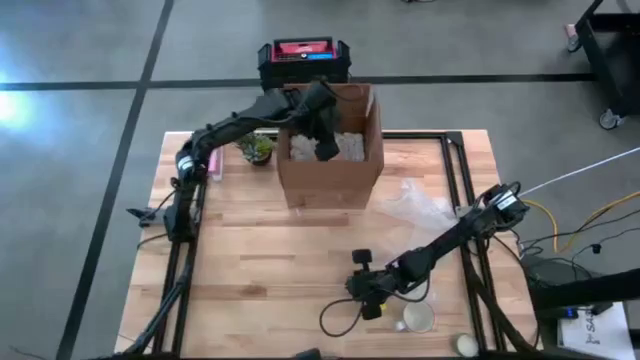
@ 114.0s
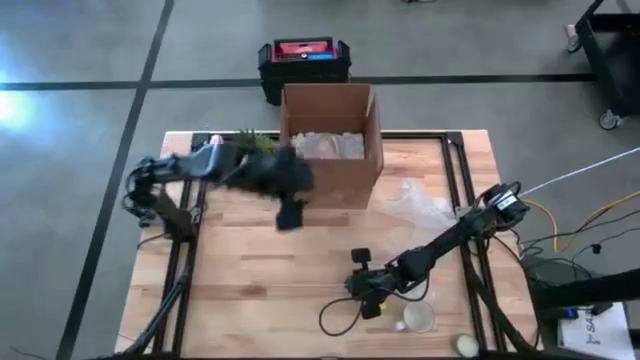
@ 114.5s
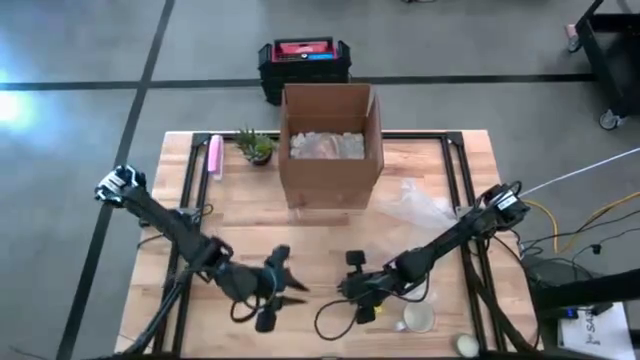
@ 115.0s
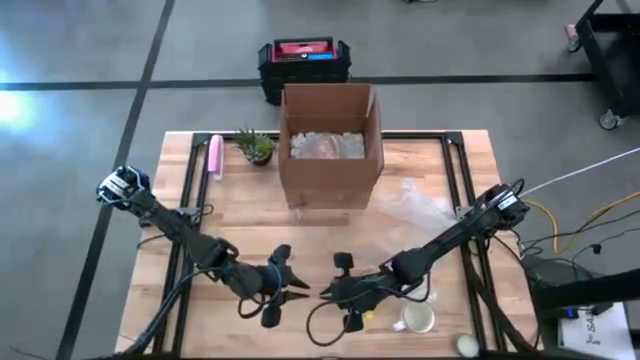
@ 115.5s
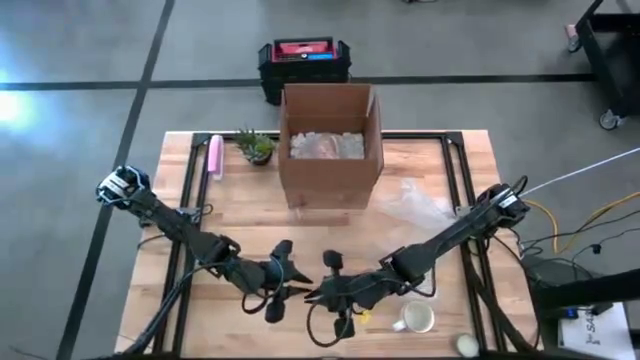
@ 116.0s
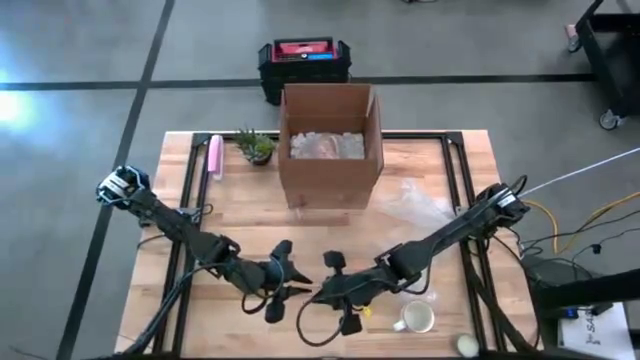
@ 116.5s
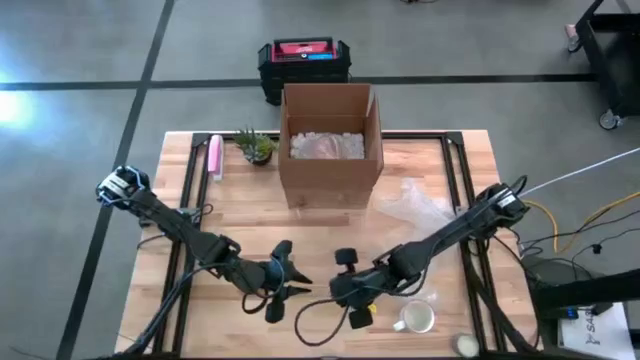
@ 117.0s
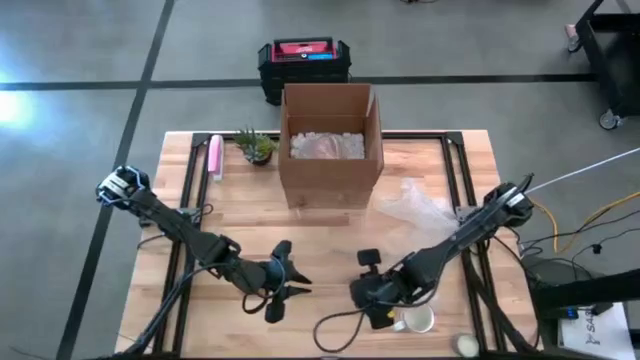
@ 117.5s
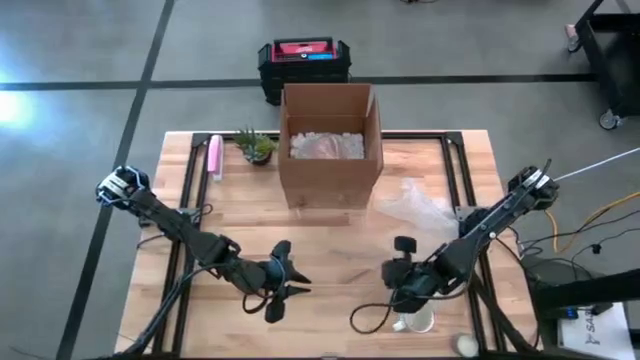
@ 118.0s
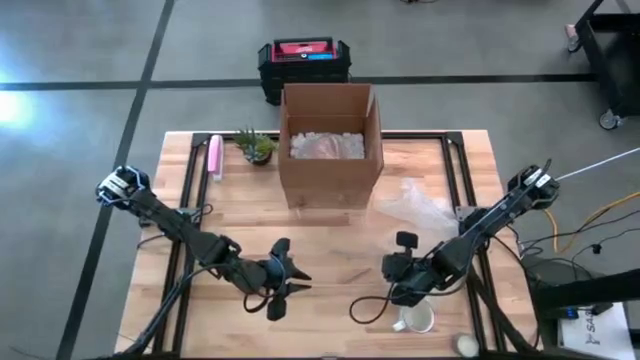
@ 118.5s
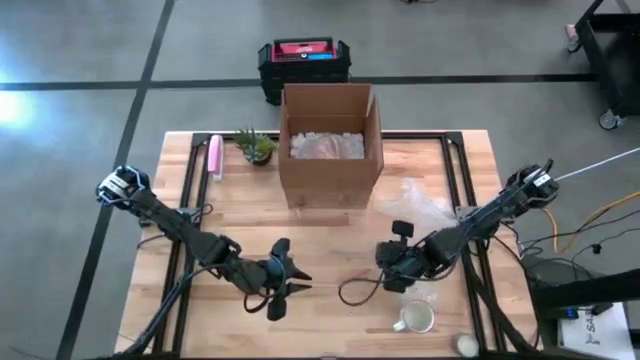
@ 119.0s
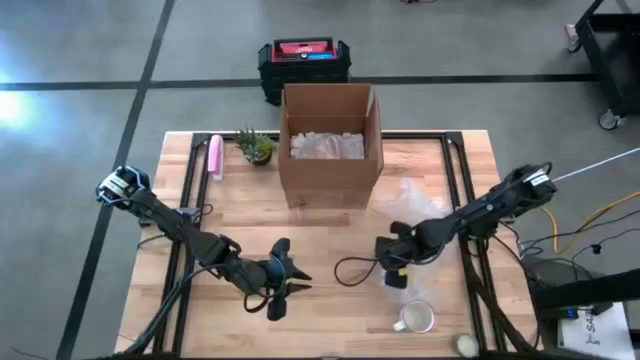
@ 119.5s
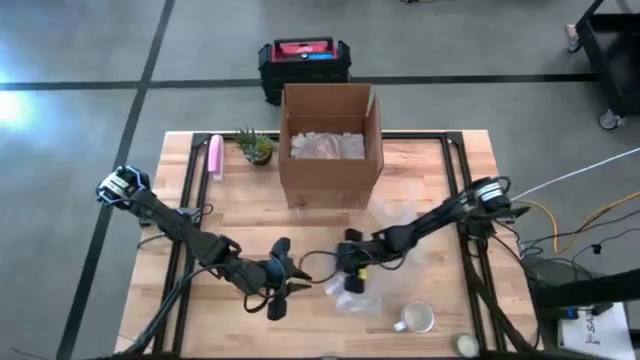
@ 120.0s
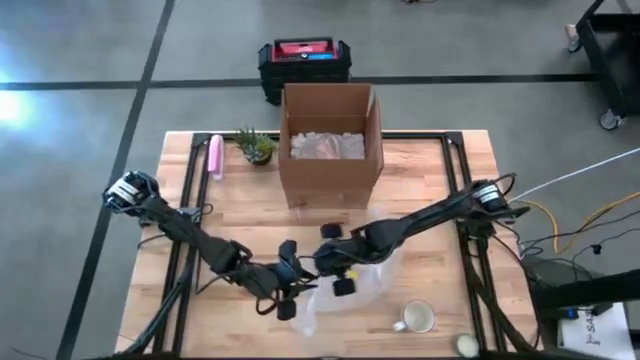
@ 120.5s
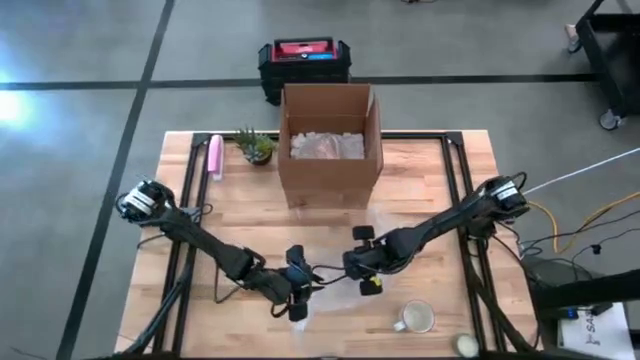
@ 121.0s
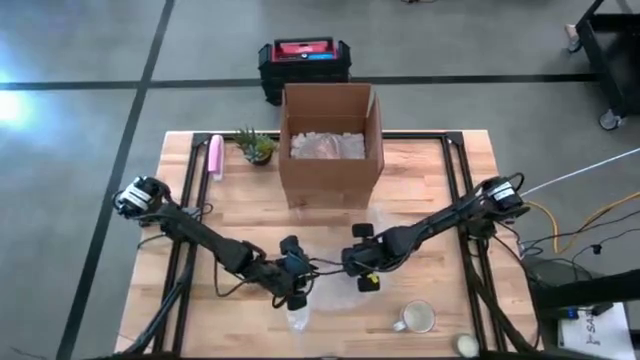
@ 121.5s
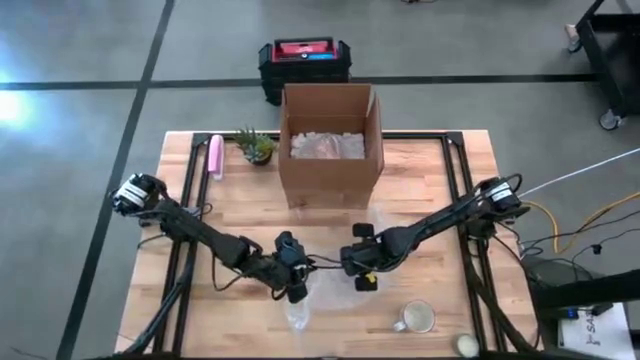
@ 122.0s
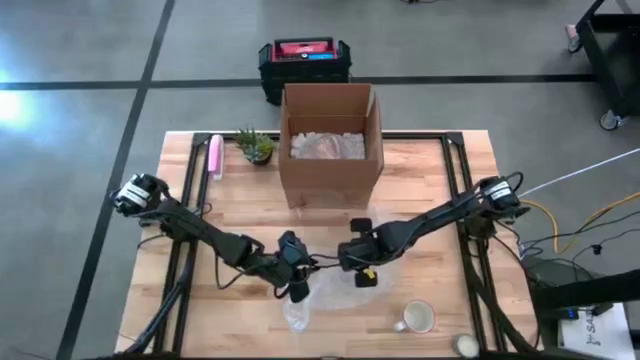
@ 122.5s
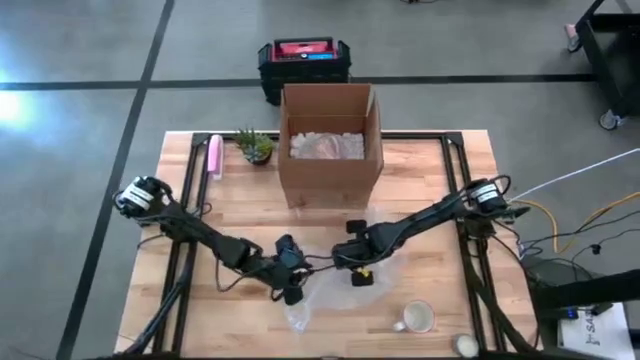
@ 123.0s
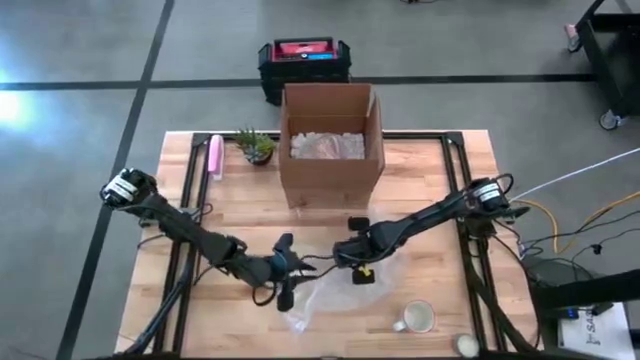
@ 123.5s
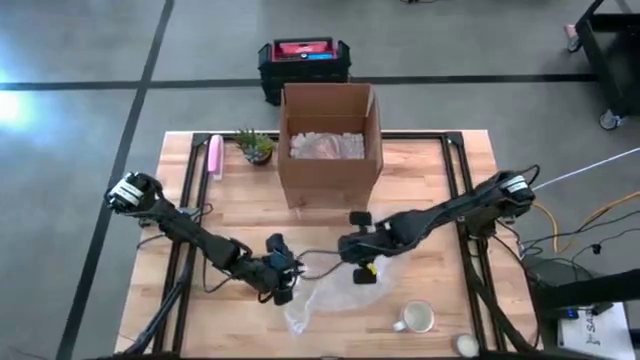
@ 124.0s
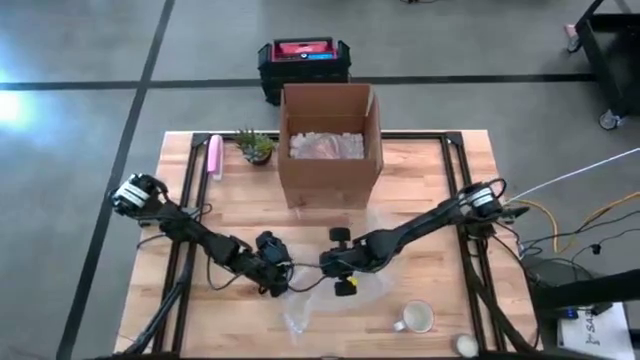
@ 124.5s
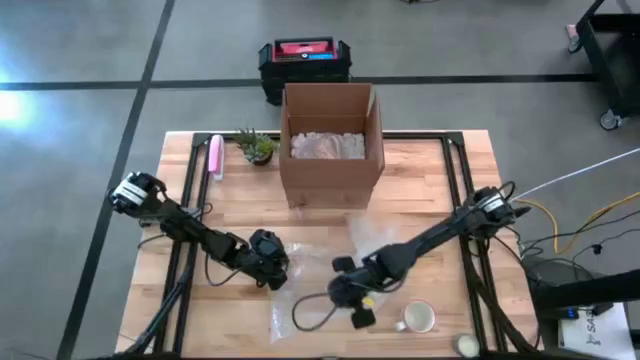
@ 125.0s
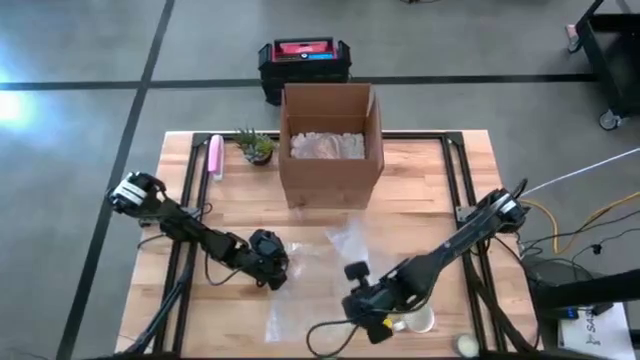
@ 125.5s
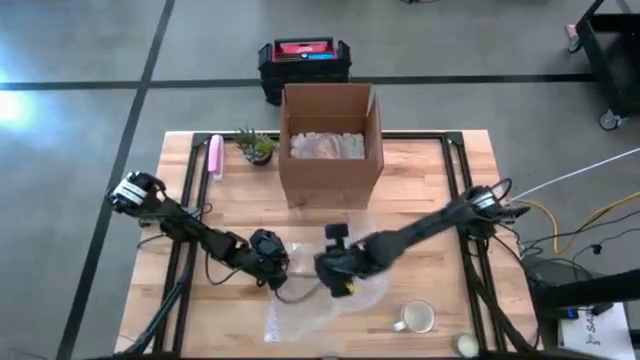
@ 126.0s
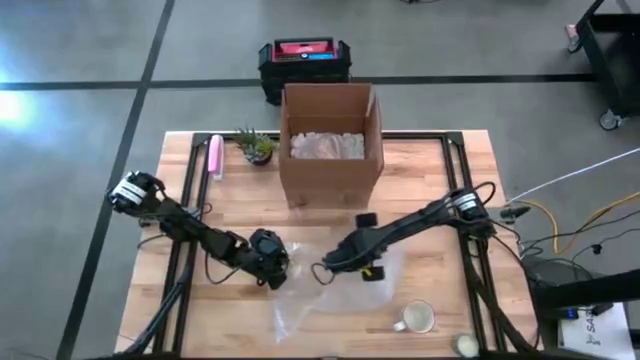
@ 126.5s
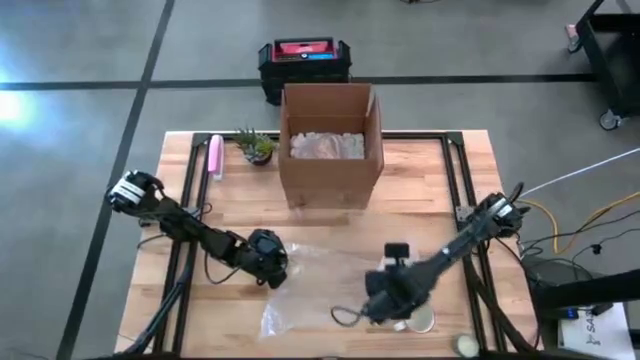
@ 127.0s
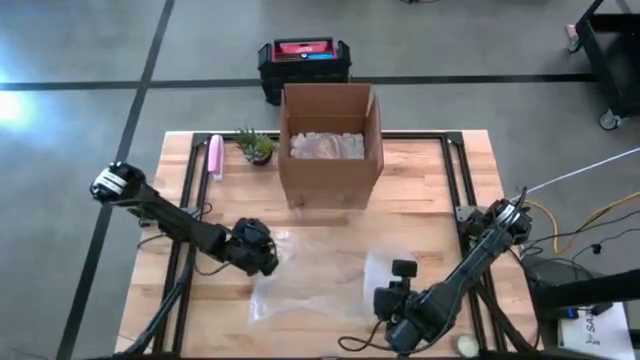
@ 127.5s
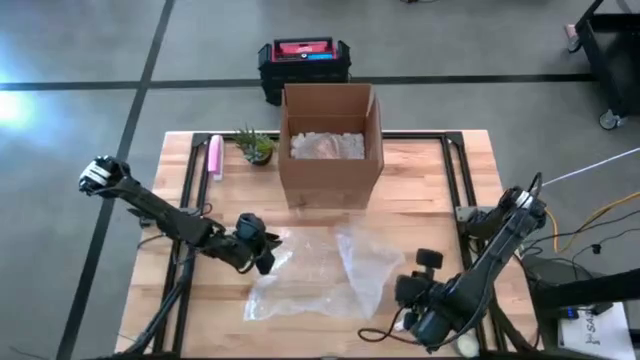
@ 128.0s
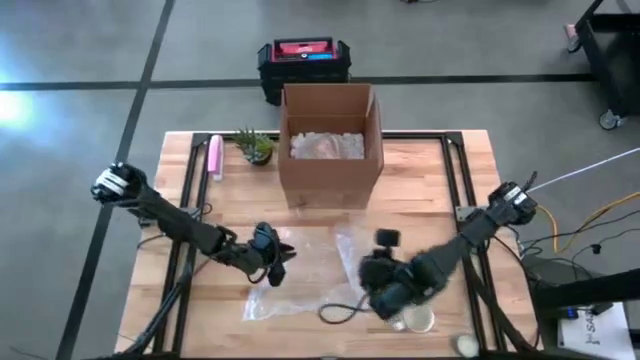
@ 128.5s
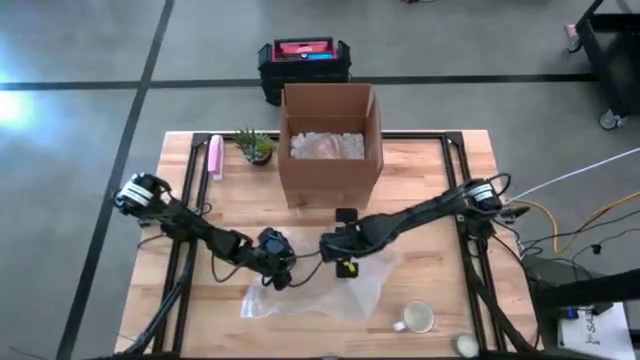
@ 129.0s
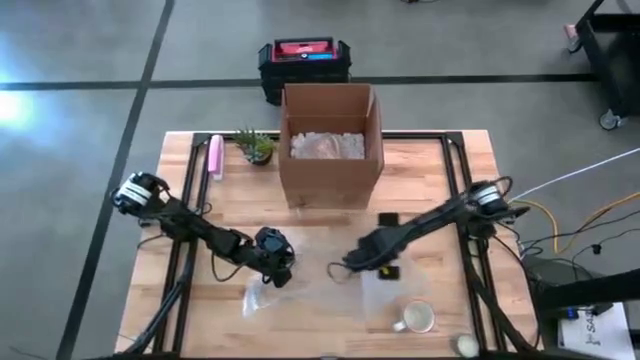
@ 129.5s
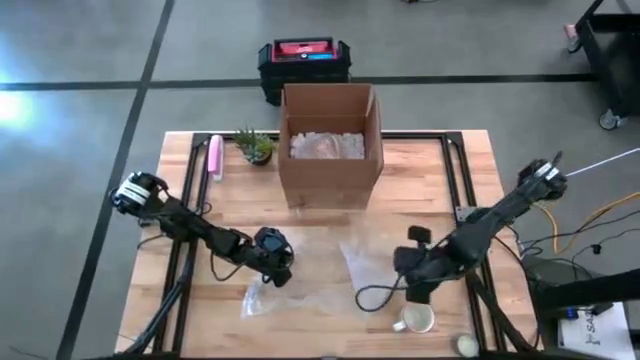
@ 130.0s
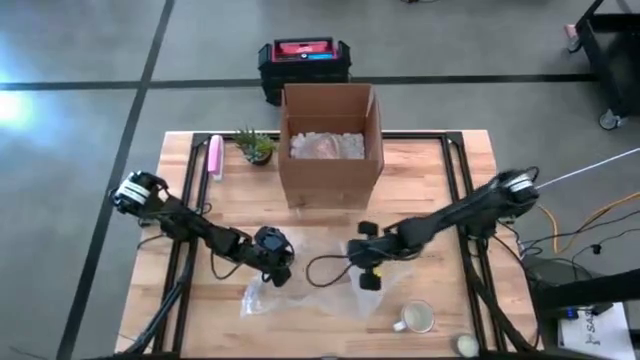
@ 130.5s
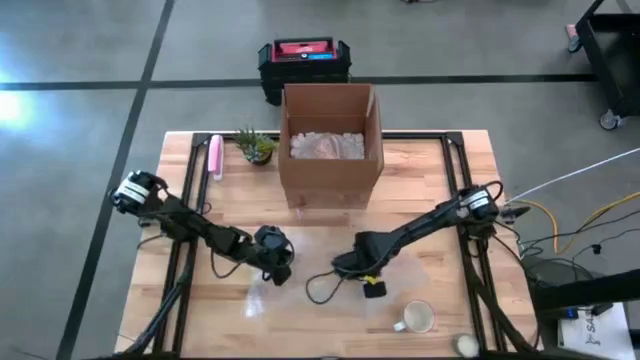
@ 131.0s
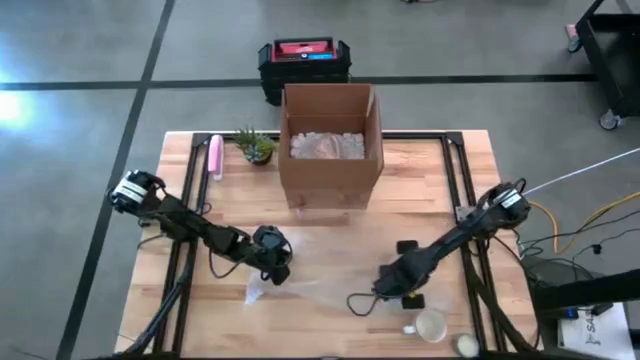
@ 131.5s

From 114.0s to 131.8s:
Task: wrap mug
Prepare the bubble wrap

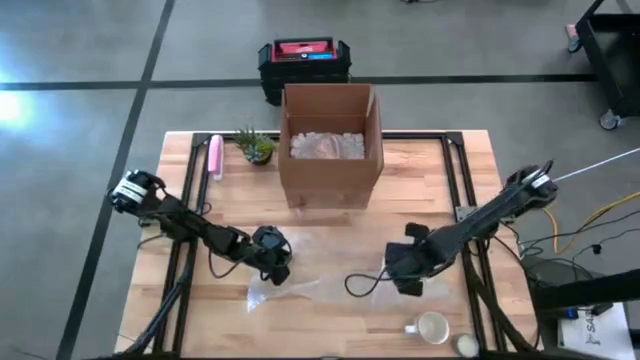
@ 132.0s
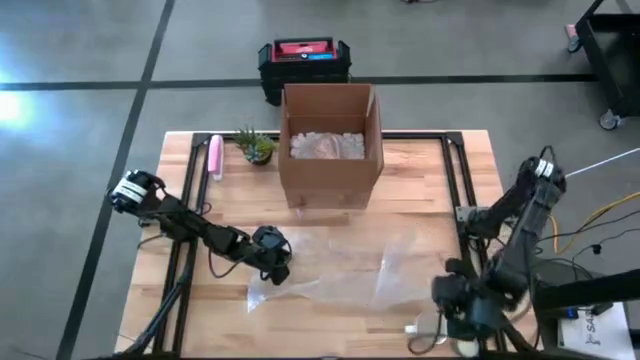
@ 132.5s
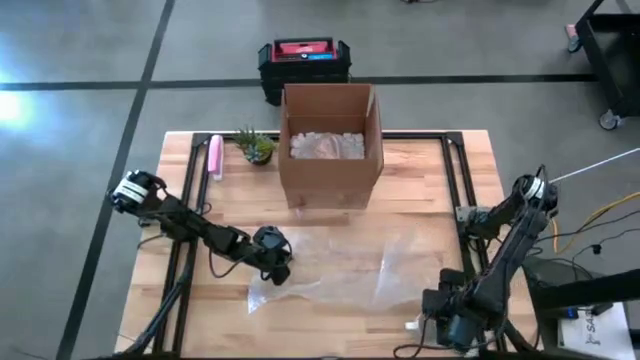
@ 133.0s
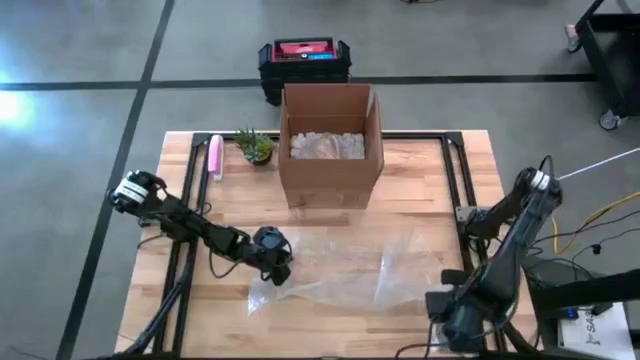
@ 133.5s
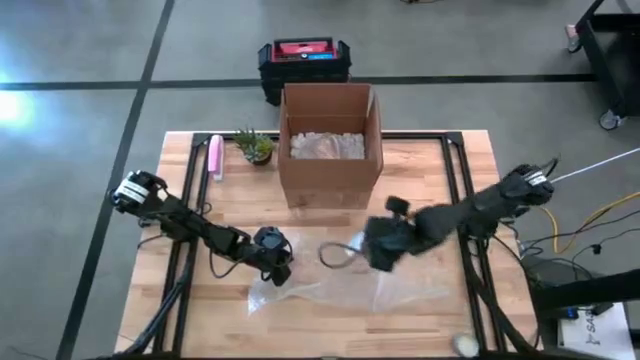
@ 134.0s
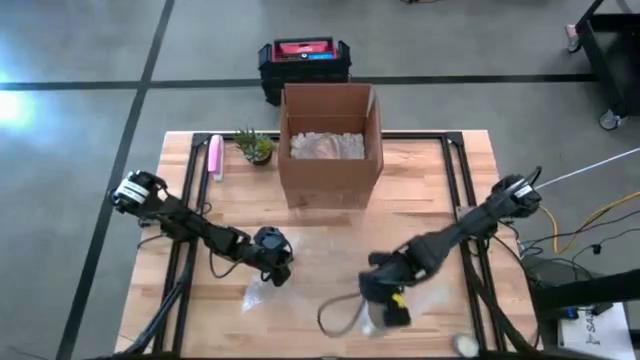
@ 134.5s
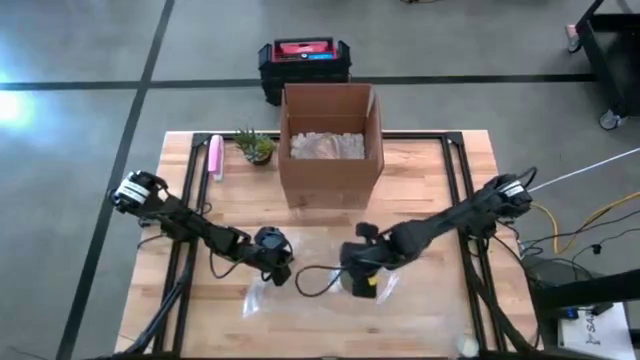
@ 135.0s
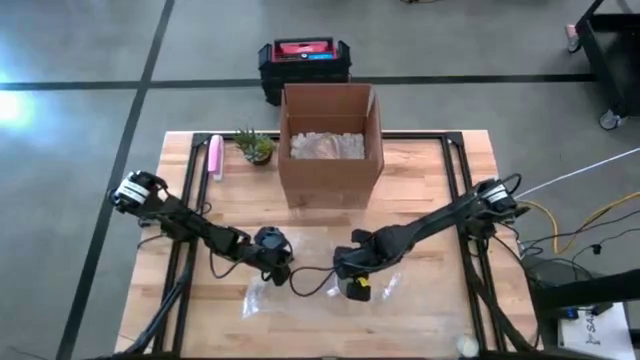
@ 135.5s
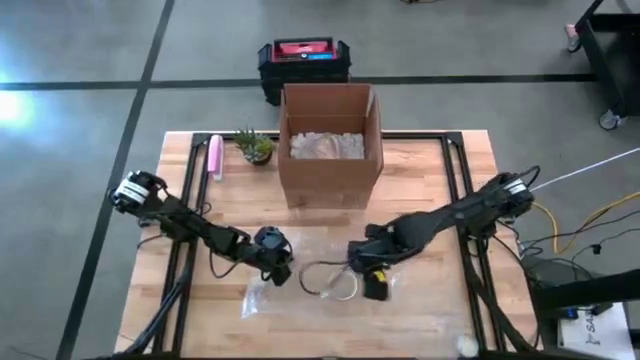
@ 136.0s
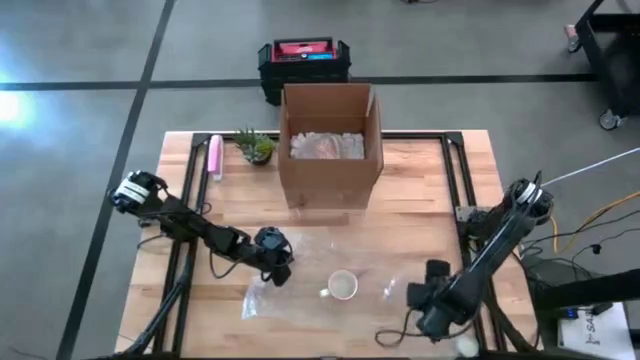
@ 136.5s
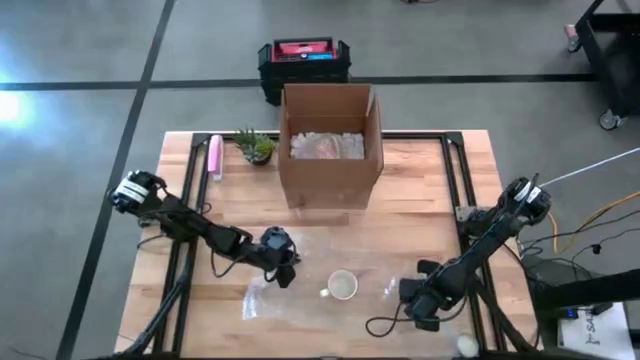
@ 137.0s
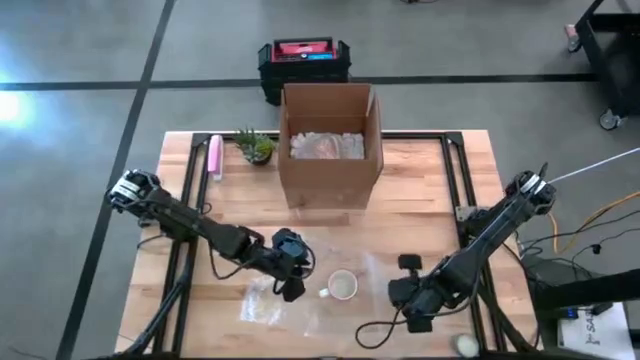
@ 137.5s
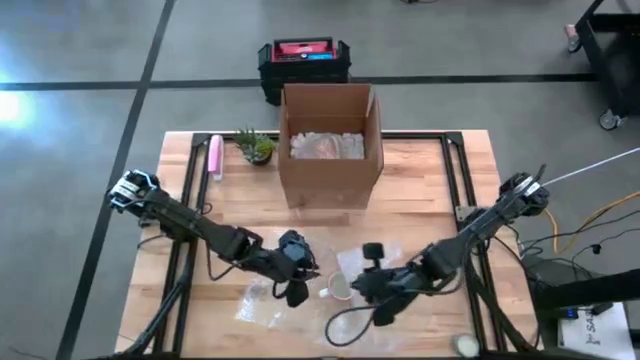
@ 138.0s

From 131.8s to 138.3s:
Wrap the gray mug with the bubble wrap
